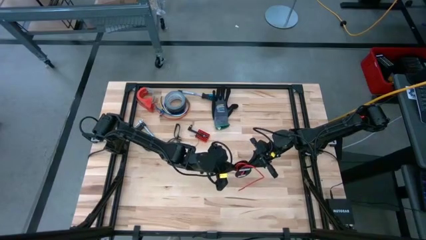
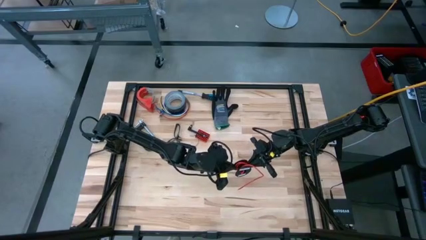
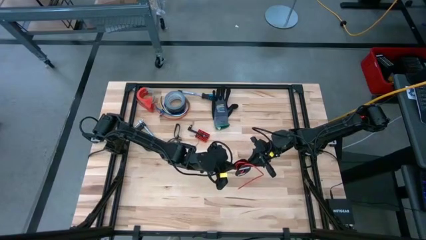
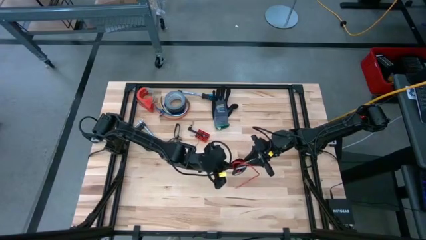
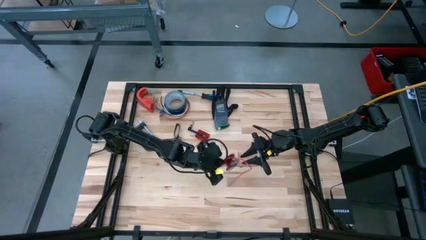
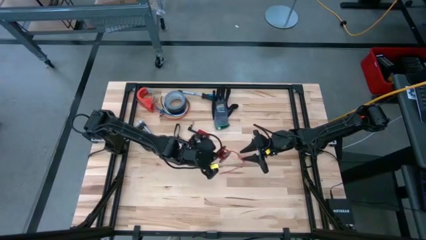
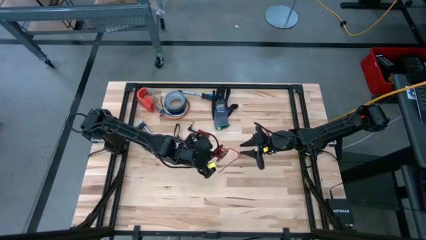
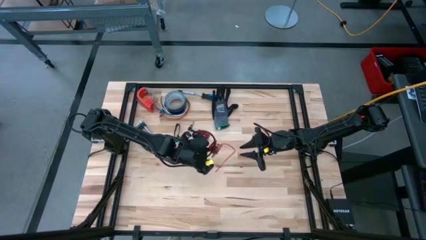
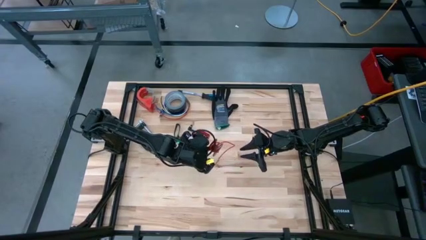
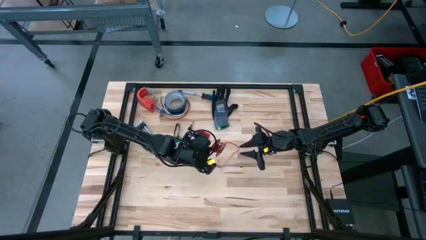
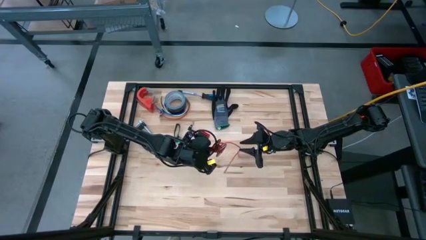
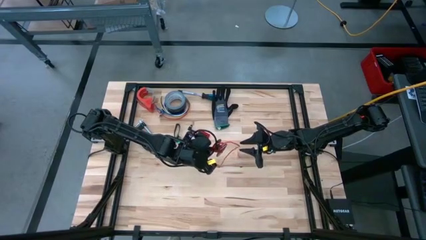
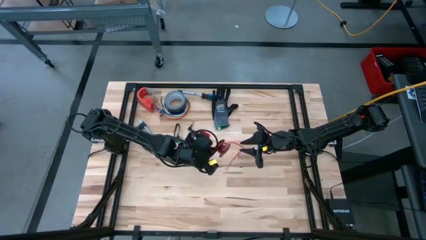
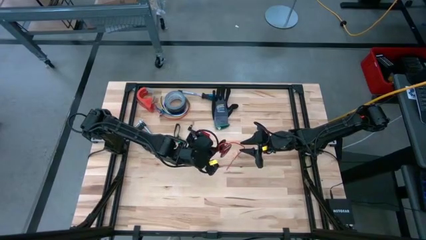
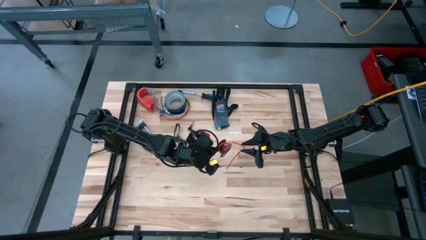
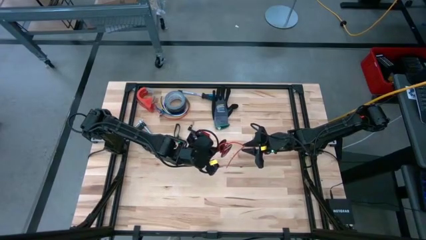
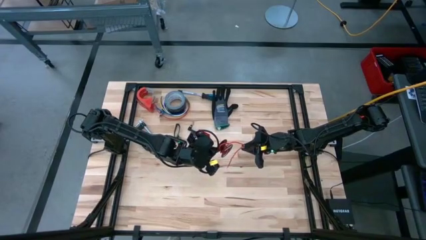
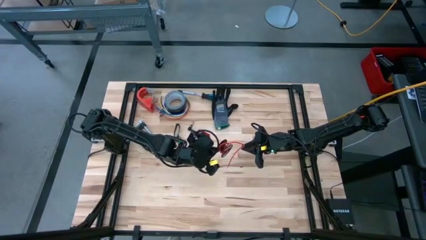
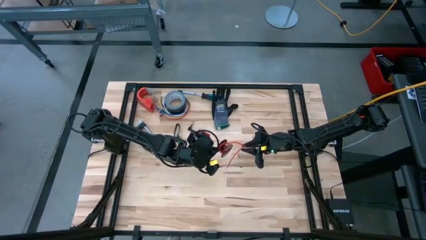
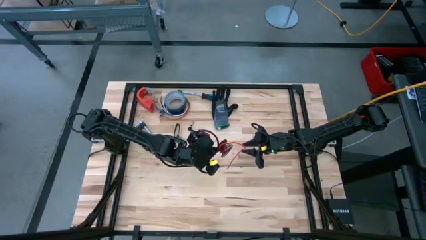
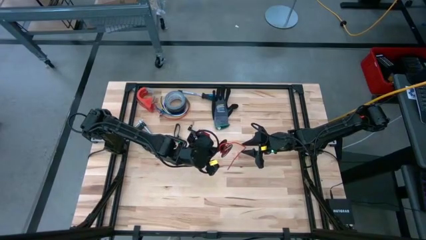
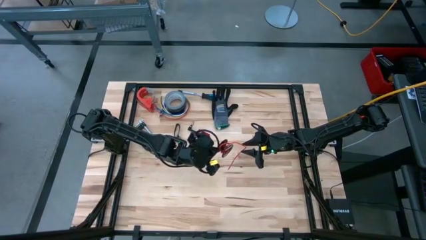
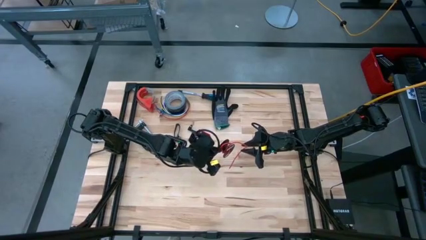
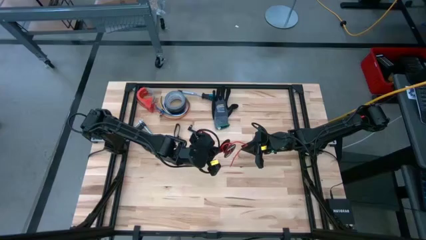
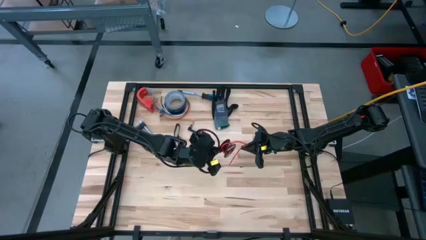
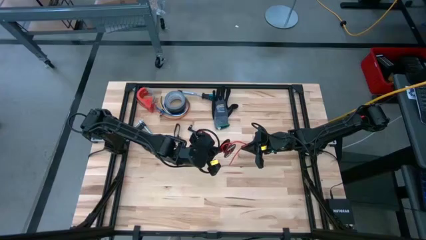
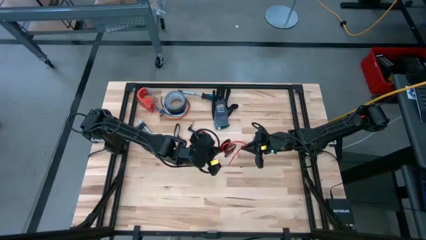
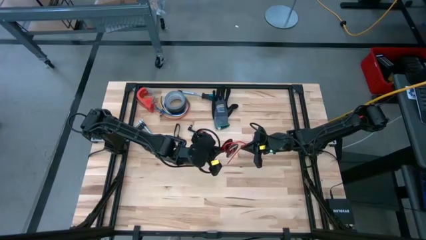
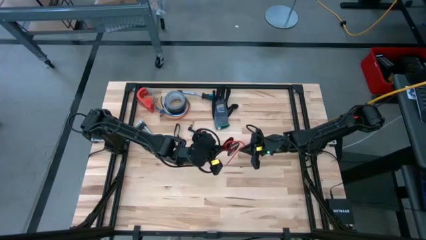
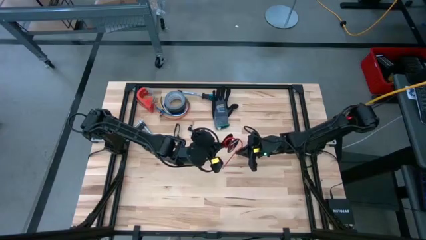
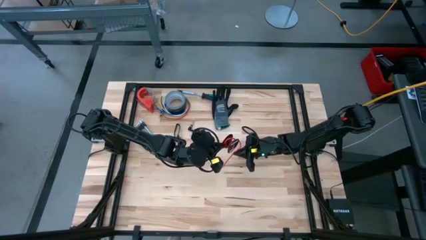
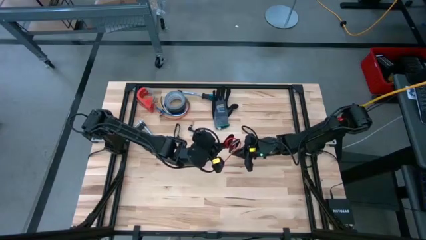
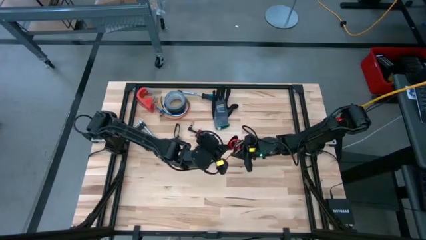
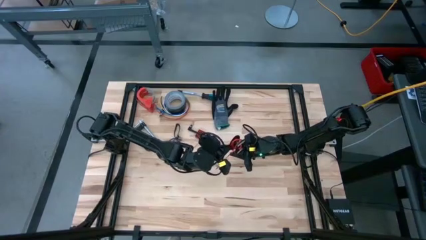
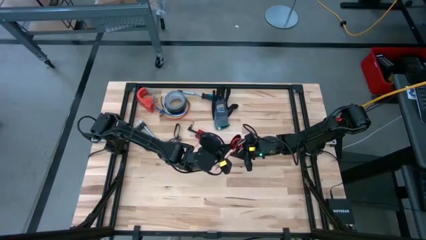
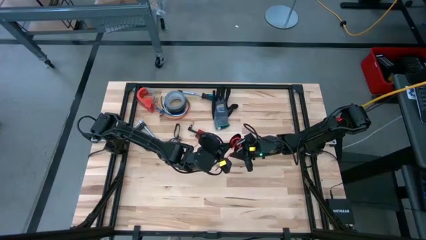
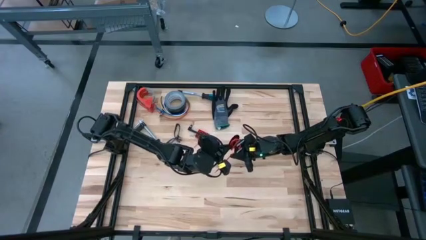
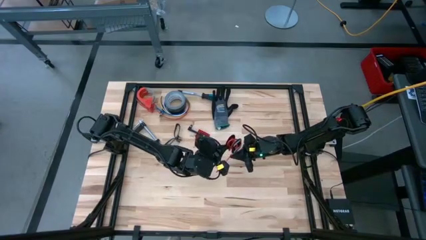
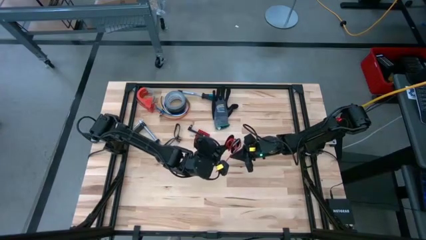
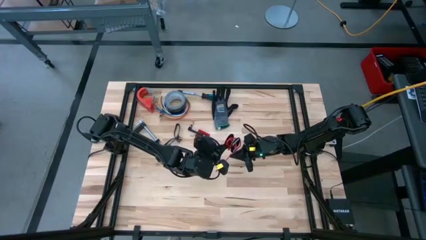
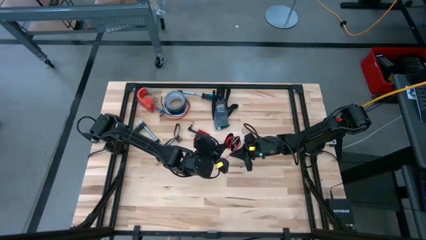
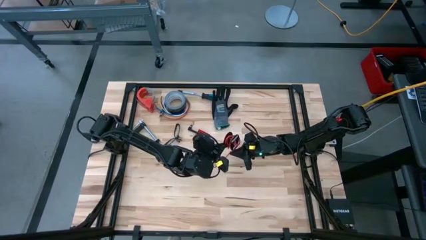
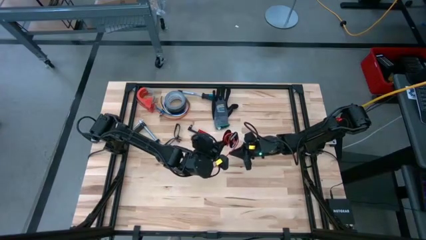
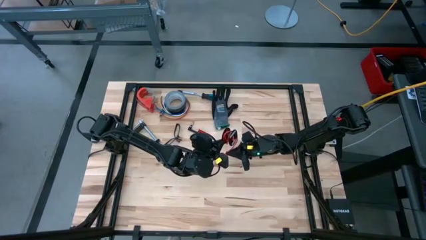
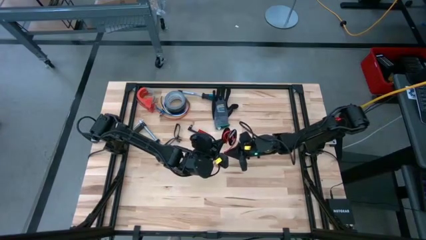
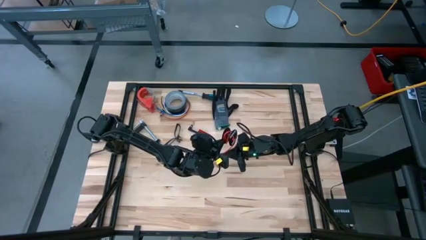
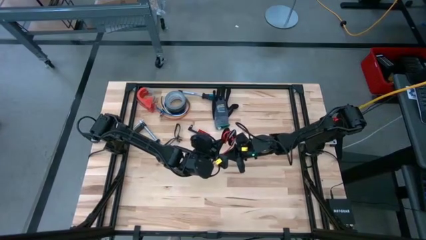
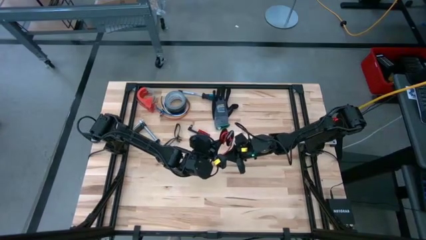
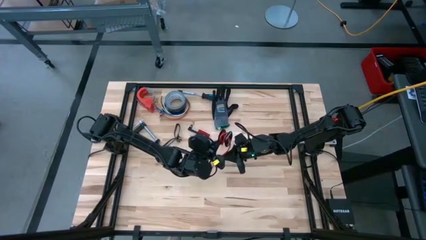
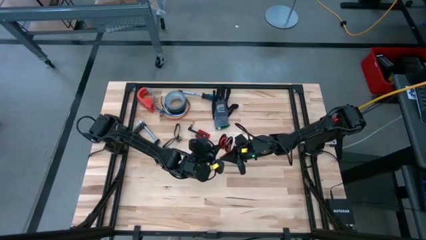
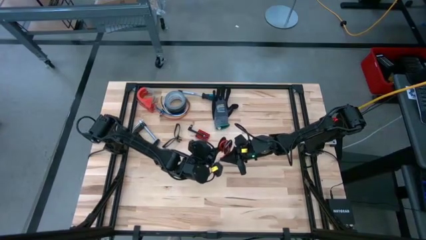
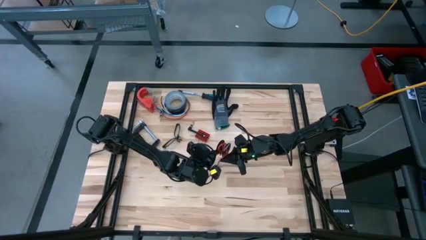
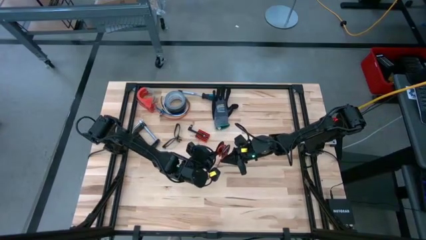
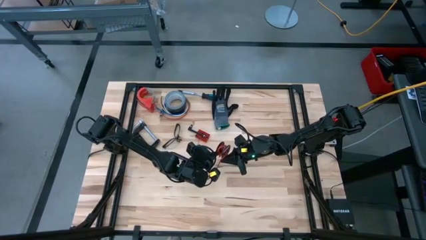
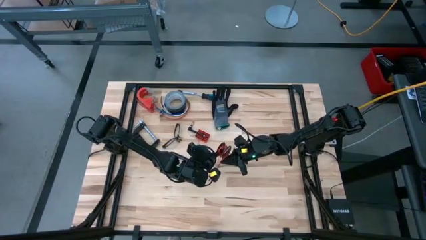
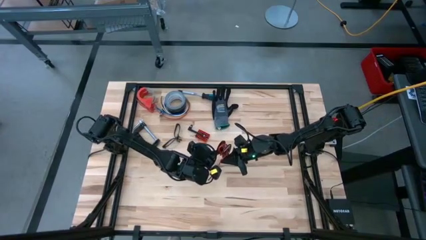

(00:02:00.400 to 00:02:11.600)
Task: Coil cords
Coil the orange wire into the black spool

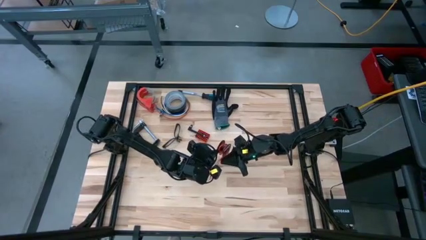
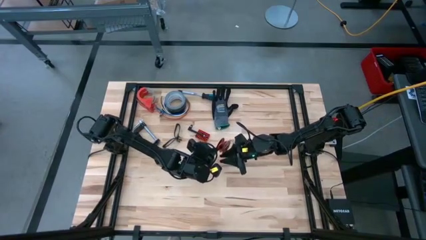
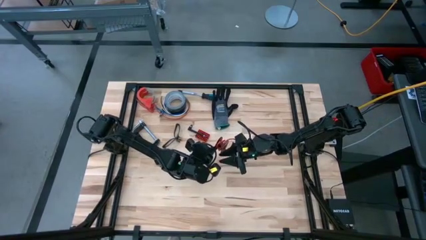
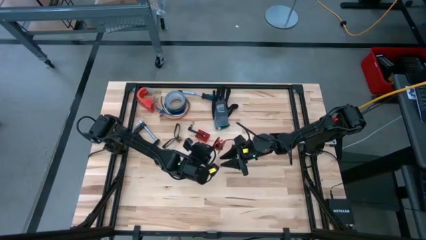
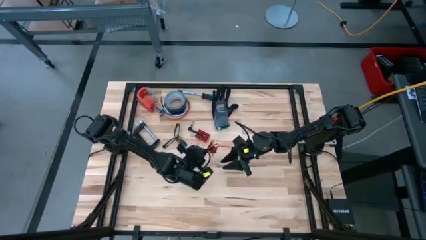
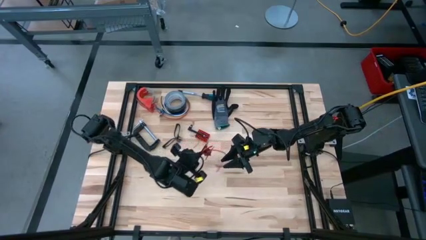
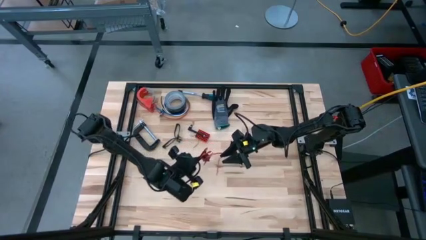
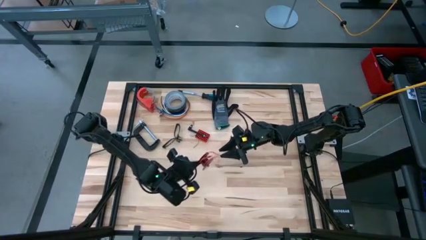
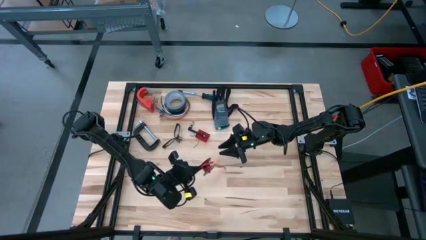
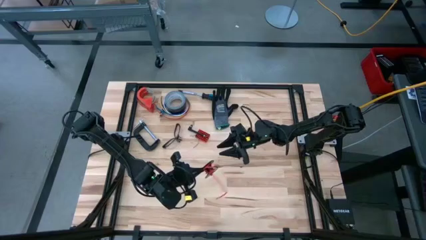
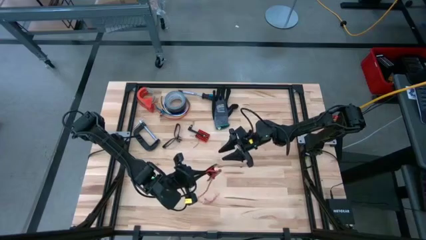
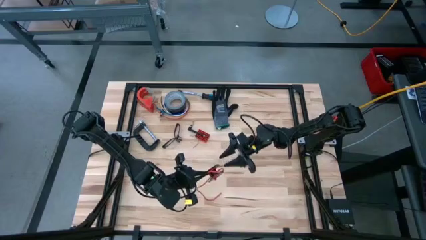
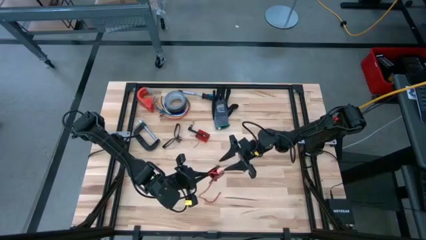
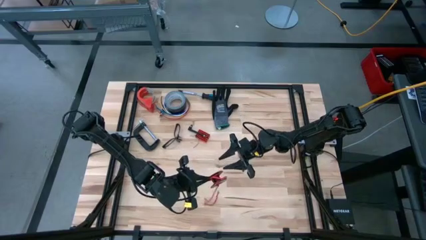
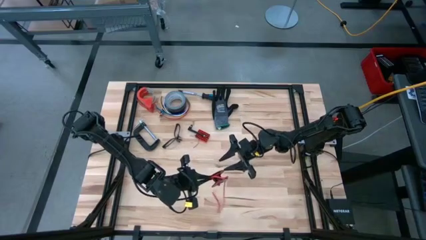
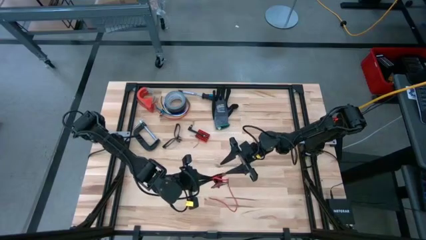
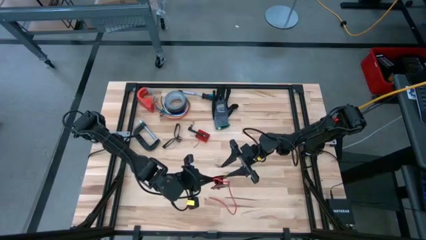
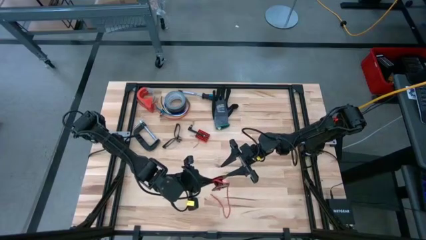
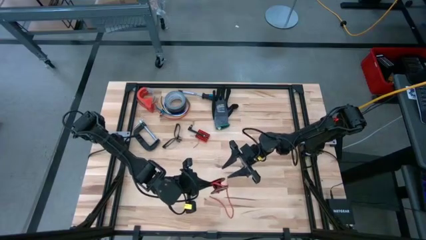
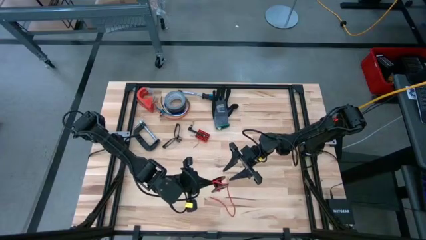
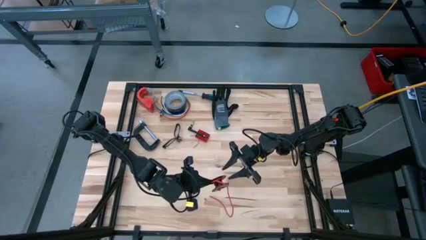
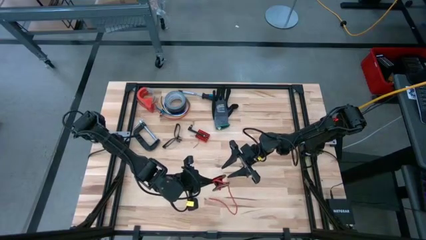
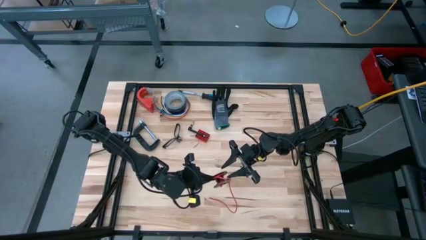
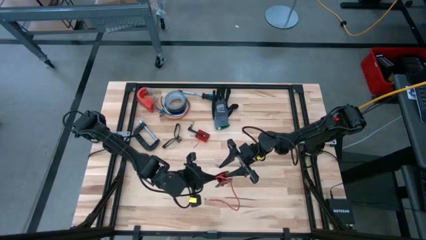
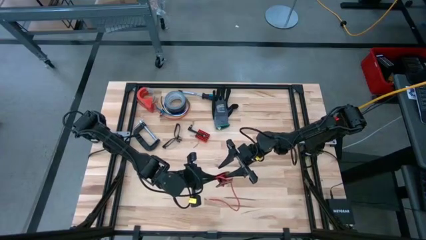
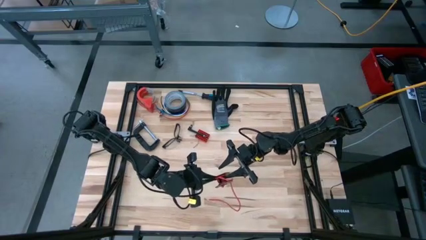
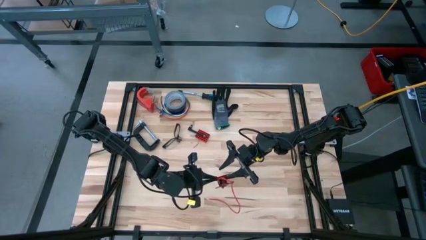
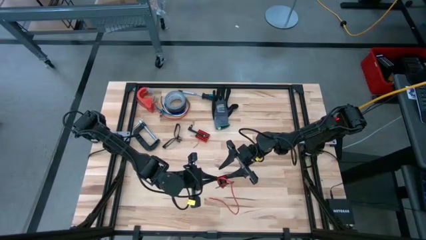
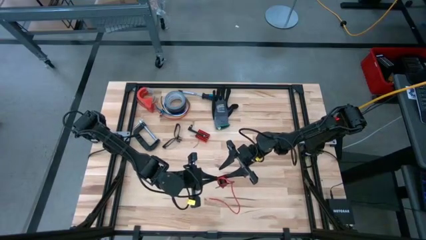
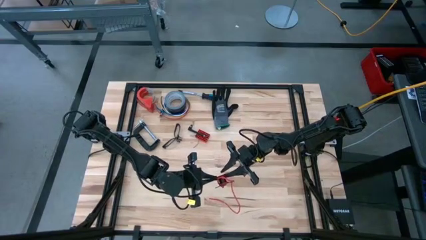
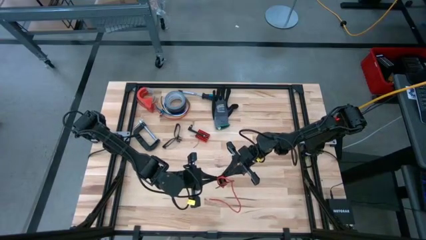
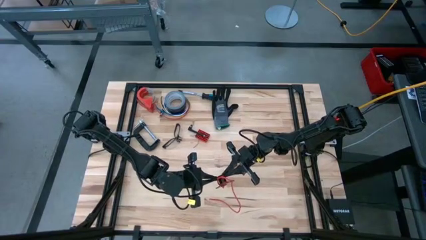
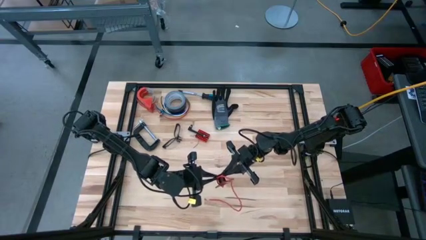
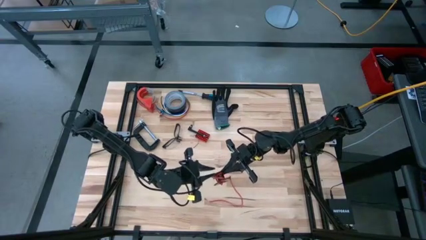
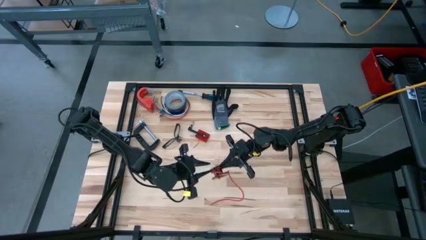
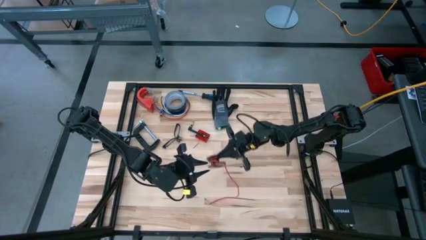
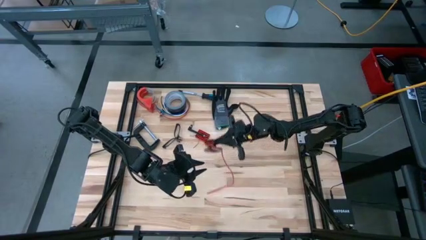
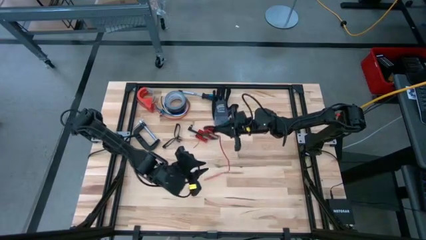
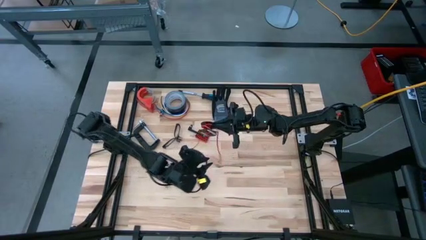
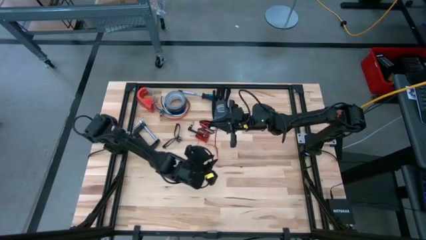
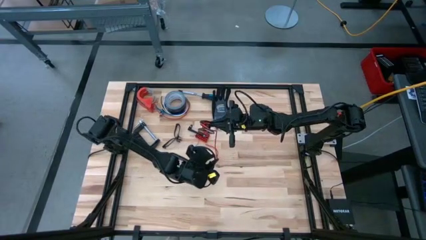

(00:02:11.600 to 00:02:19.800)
Coil the orange wire into the black spool
